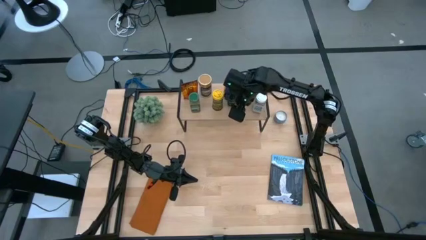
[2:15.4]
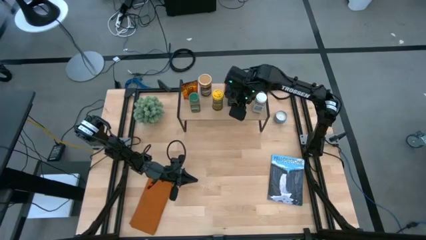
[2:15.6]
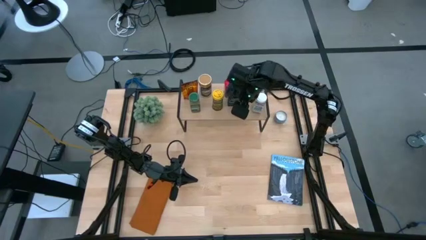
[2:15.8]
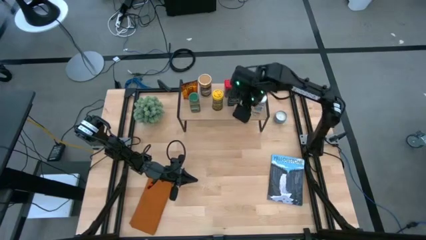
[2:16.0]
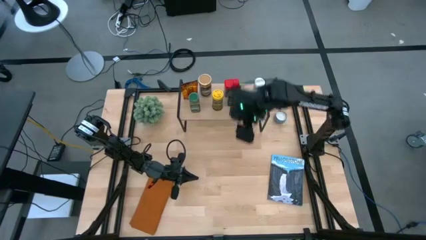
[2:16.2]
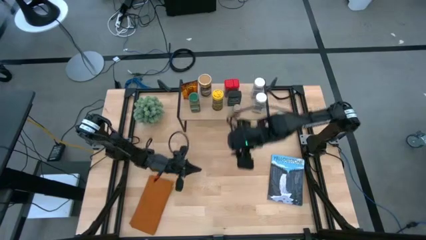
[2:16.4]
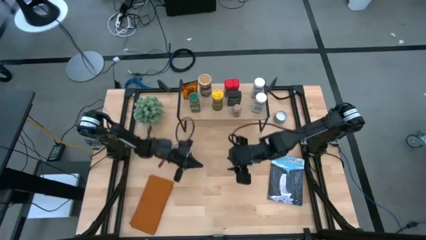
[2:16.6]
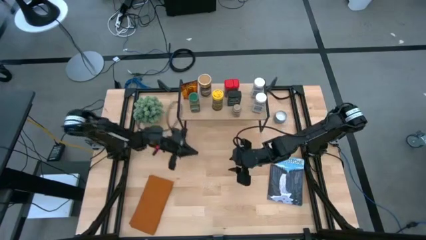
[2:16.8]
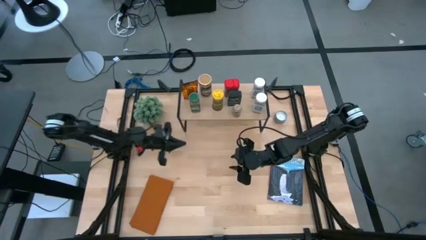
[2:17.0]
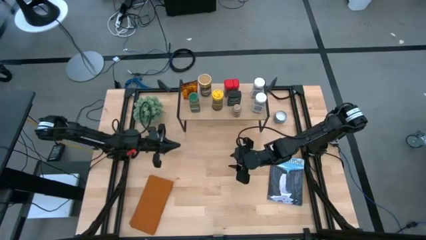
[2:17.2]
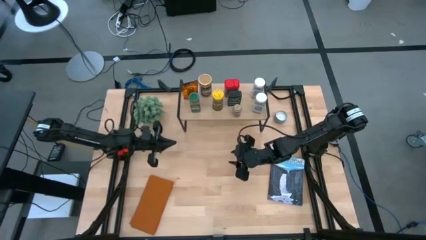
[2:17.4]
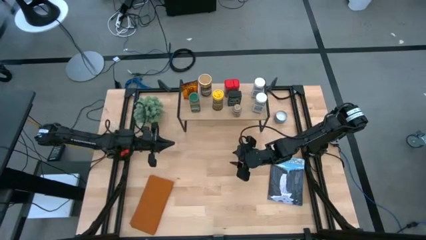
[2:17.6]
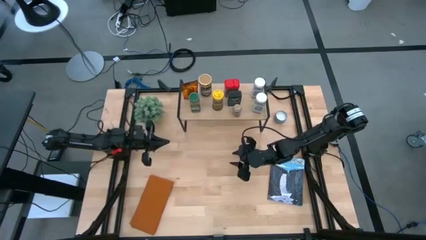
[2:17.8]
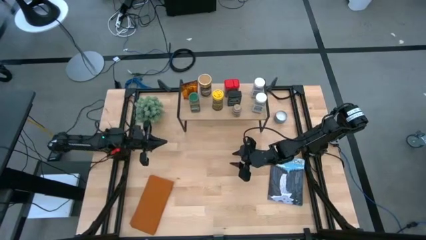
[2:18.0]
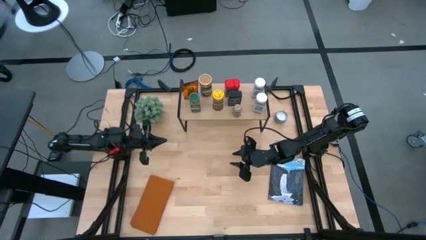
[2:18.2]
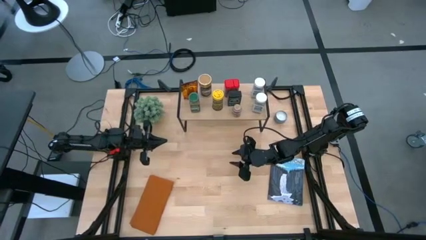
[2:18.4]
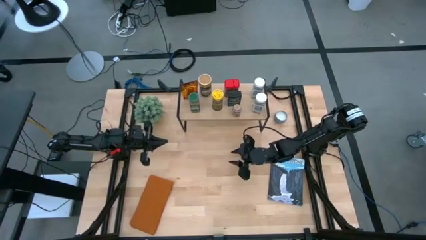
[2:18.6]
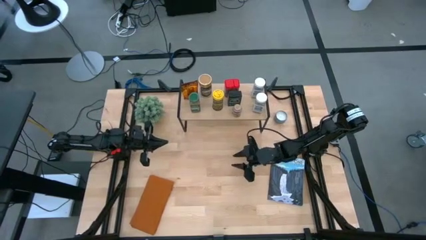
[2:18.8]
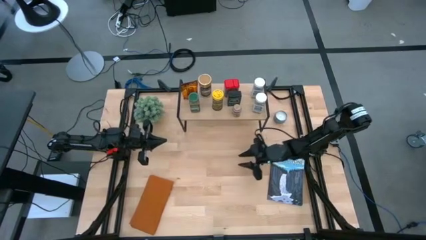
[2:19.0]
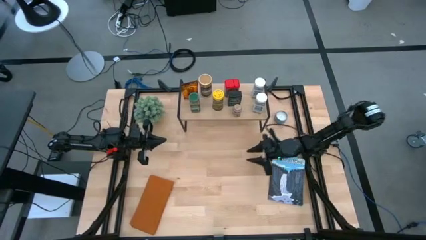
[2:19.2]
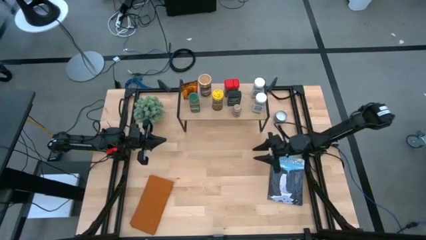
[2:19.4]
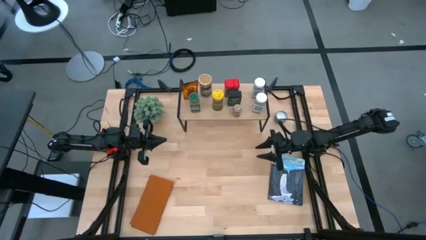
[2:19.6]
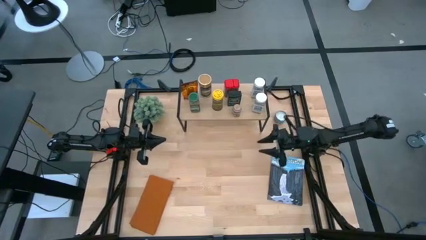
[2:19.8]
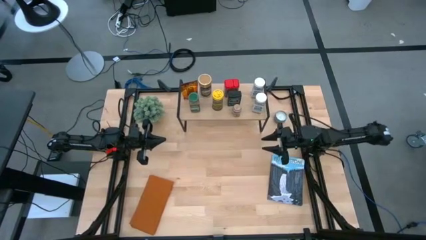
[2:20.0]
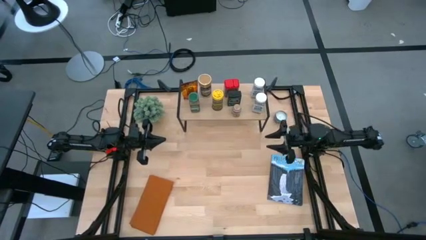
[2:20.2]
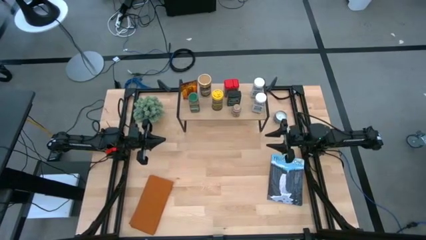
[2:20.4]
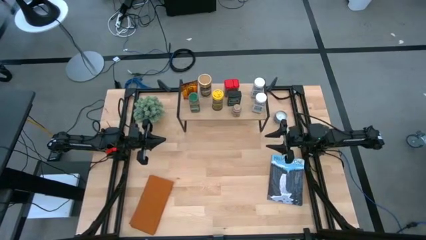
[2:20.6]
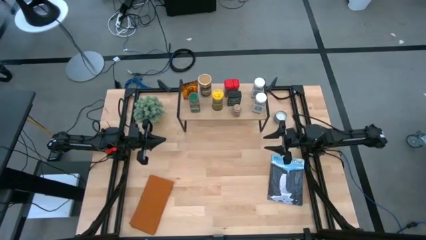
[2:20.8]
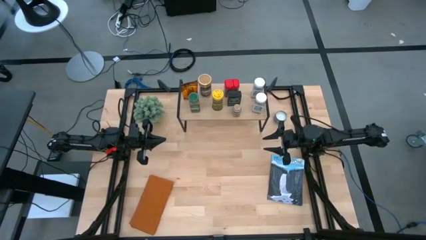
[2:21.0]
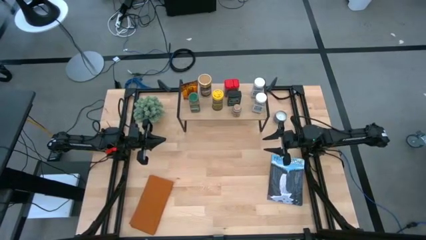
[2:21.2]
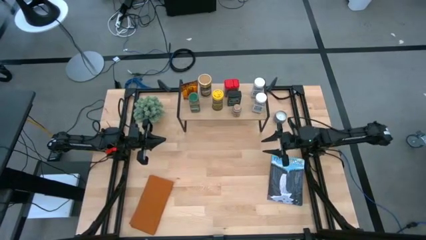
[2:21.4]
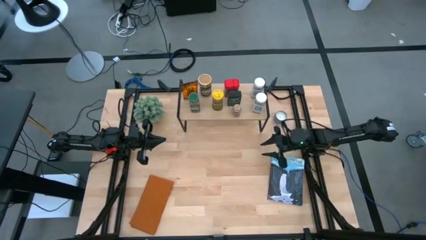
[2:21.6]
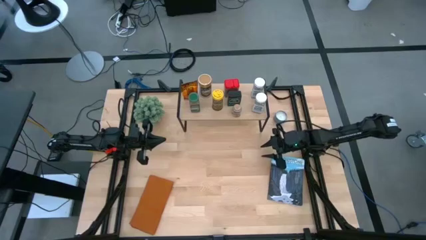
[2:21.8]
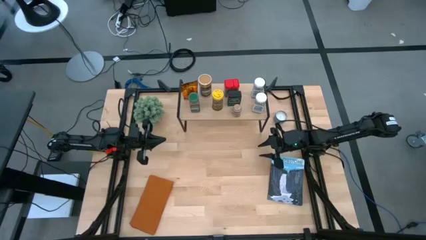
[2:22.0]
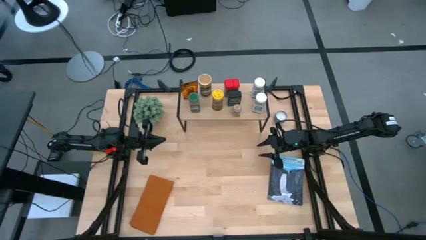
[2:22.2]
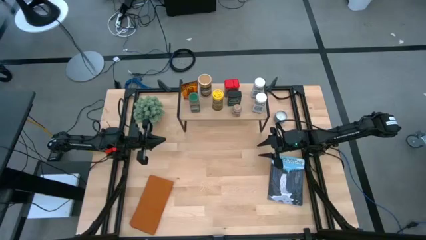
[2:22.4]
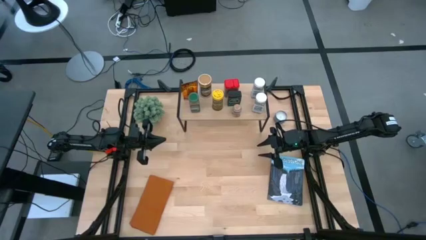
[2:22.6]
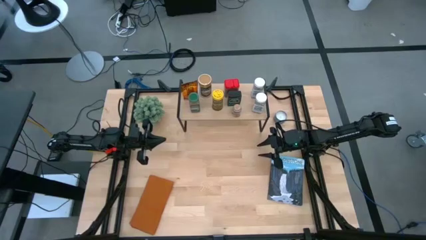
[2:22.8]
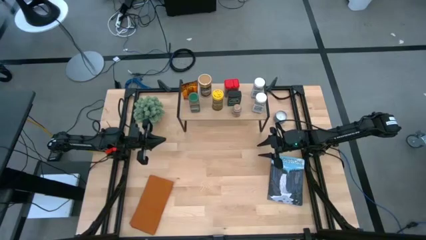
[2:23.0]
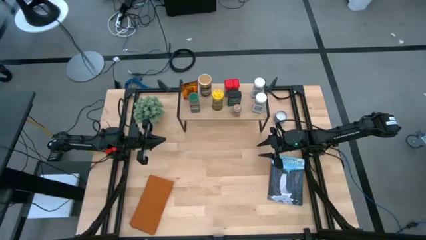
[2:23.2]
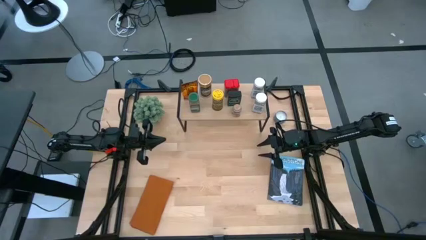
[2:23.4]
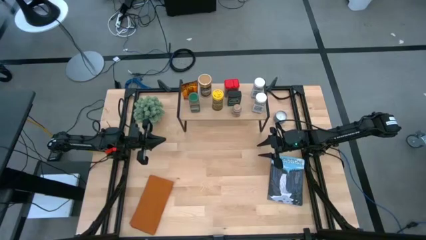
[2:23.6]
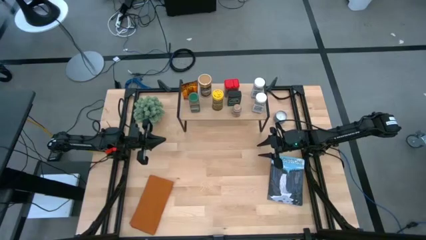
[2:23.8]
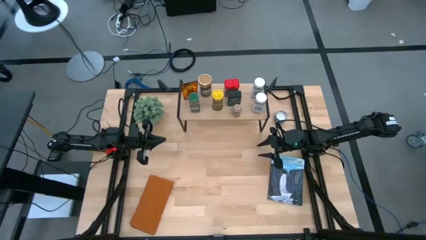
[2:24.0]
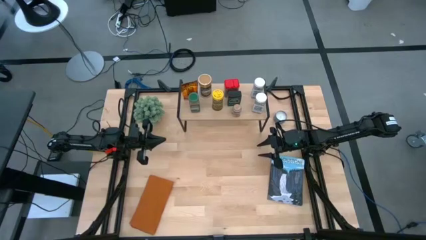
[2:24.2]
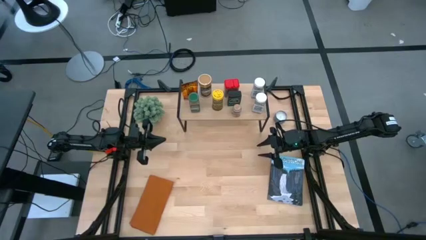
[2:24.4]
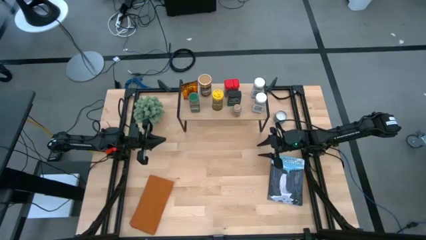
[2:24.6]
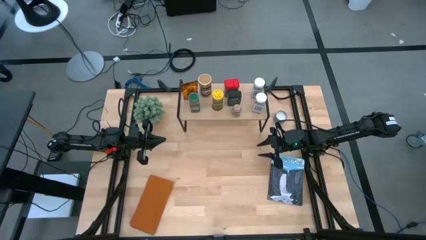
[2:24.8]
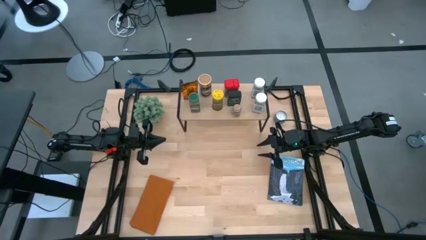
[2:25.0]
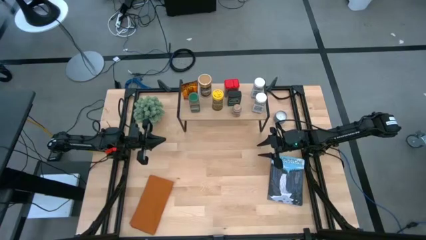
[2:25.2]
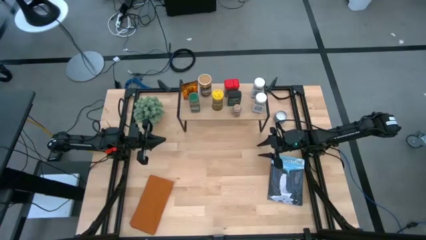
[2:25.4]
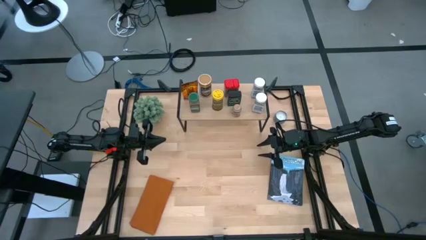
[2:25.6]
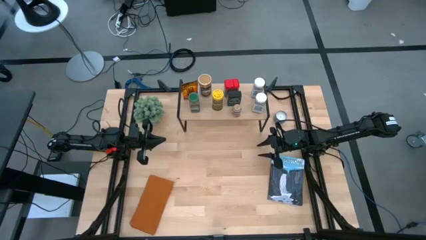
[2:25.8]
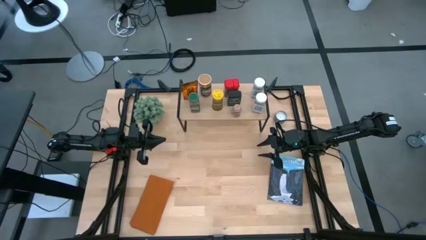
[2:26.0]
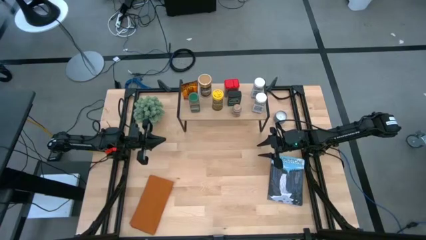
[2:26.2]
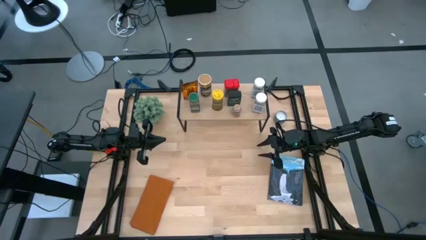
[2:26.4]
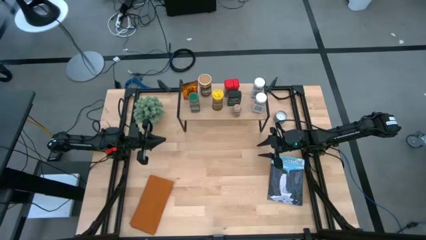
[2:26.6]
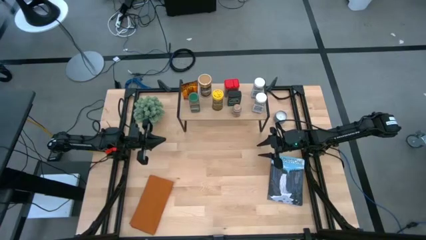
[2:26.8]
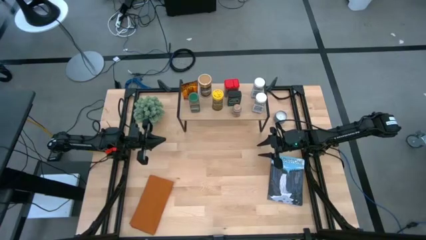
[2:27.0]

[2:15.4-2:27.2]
Task: Shelf spices
Return to Home Position
